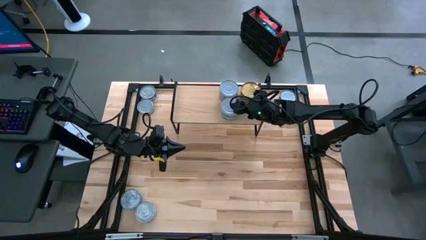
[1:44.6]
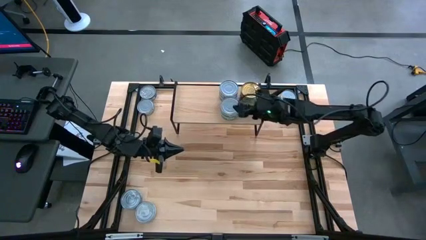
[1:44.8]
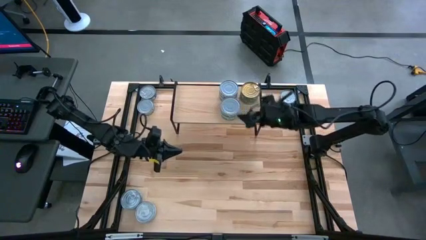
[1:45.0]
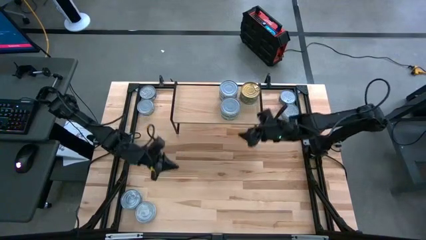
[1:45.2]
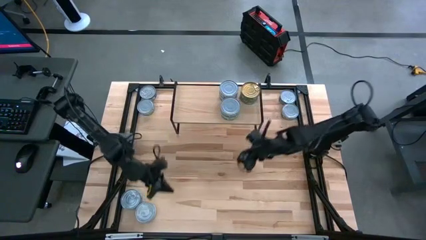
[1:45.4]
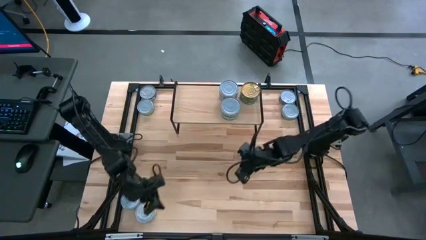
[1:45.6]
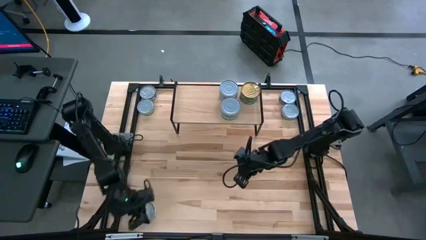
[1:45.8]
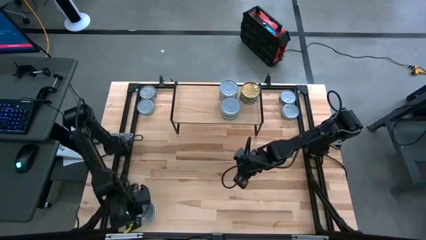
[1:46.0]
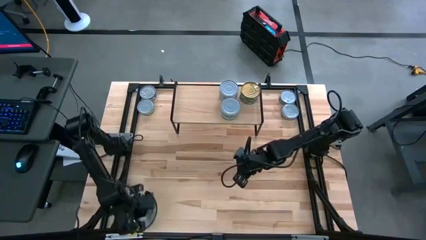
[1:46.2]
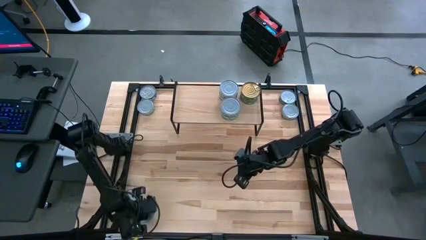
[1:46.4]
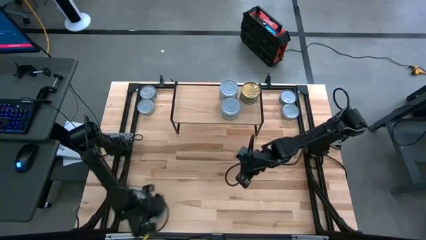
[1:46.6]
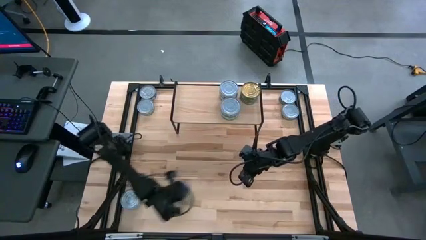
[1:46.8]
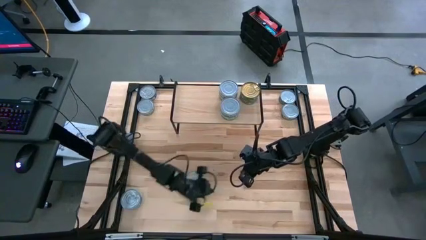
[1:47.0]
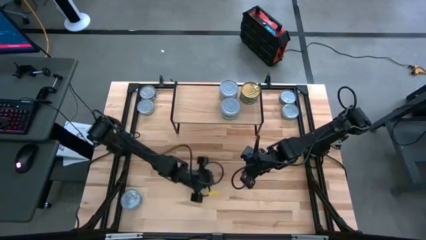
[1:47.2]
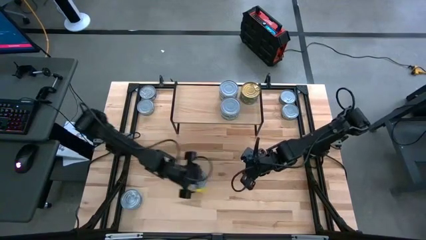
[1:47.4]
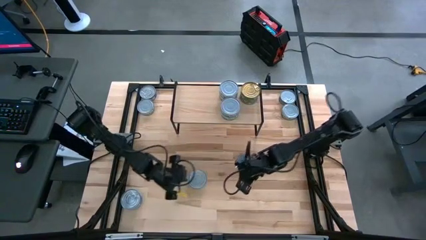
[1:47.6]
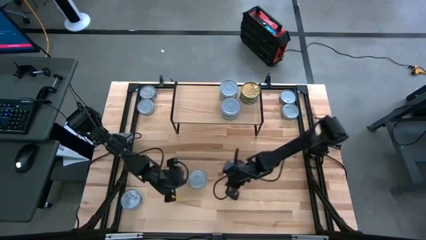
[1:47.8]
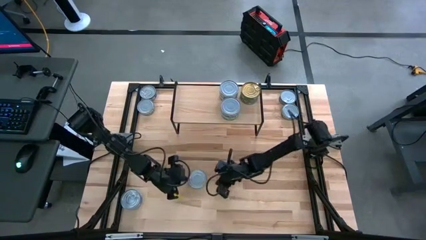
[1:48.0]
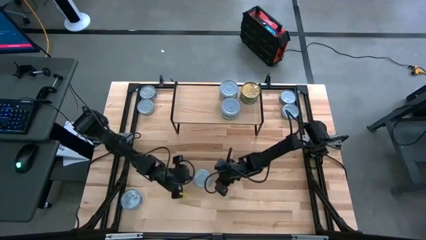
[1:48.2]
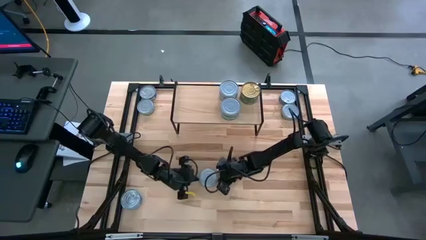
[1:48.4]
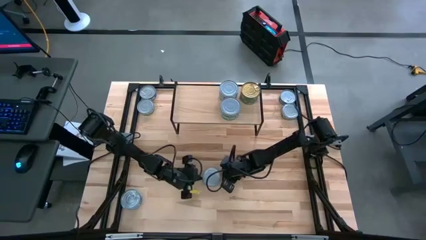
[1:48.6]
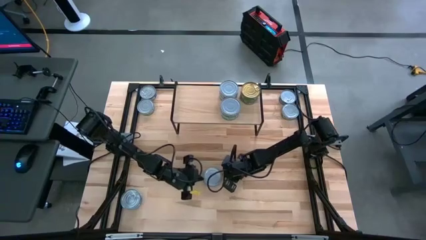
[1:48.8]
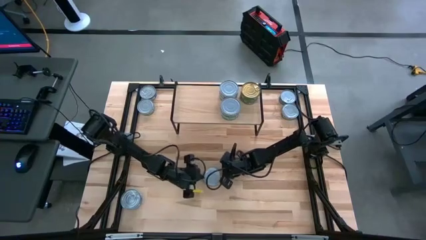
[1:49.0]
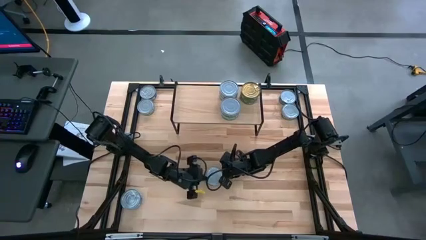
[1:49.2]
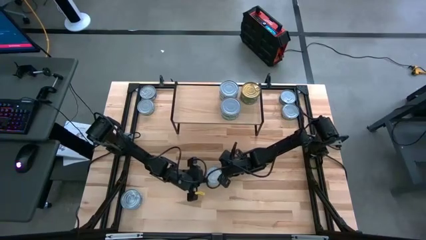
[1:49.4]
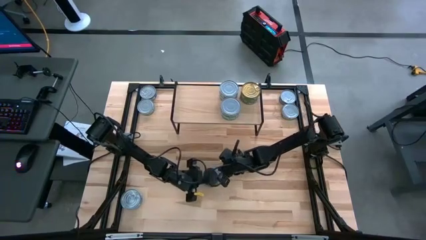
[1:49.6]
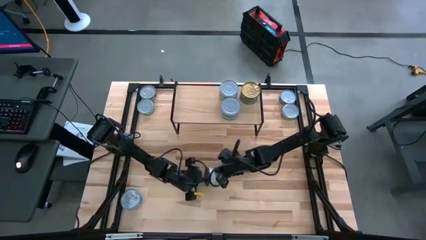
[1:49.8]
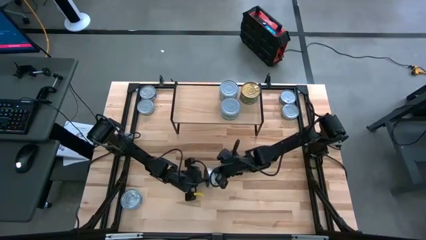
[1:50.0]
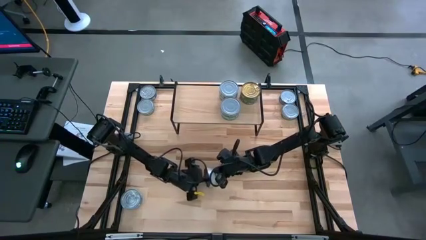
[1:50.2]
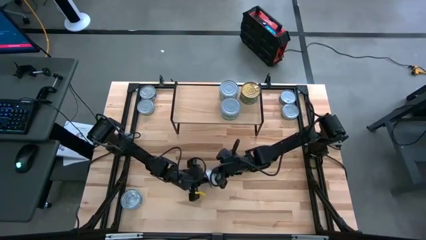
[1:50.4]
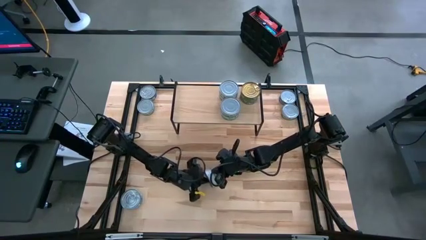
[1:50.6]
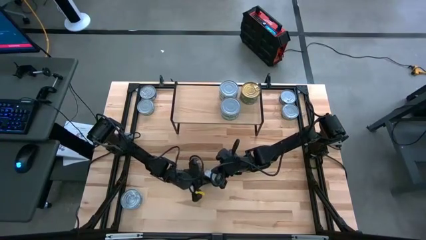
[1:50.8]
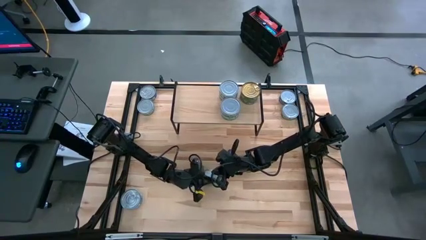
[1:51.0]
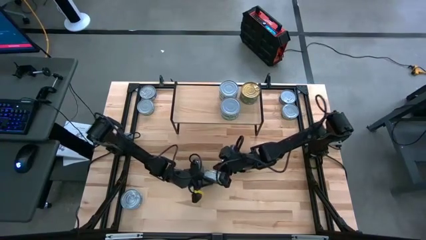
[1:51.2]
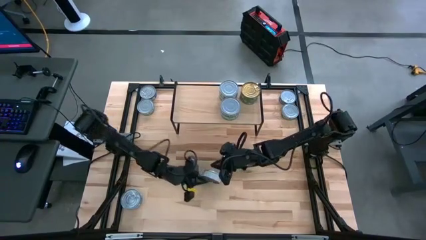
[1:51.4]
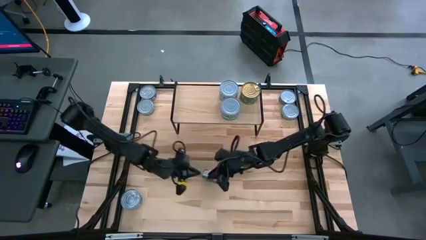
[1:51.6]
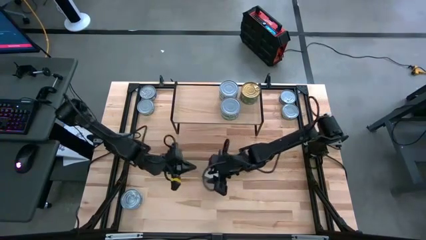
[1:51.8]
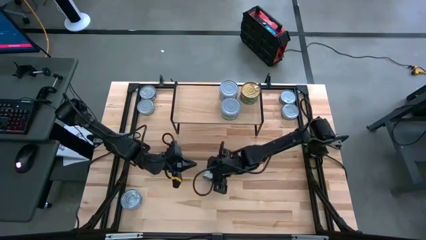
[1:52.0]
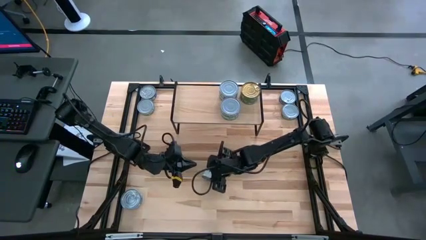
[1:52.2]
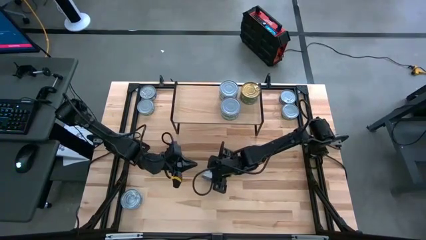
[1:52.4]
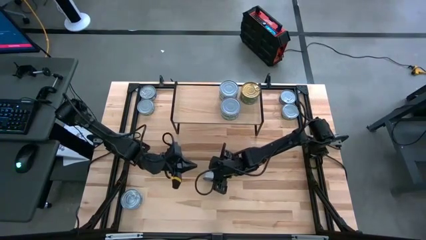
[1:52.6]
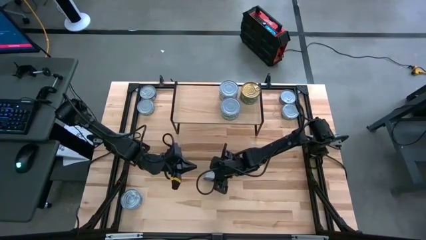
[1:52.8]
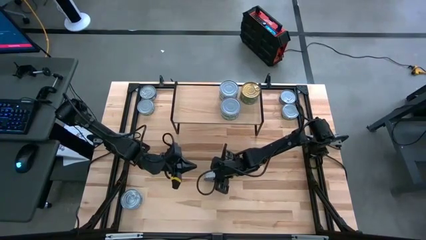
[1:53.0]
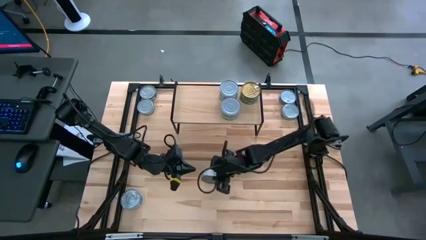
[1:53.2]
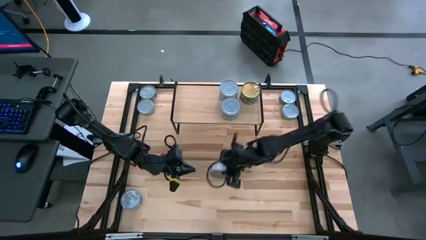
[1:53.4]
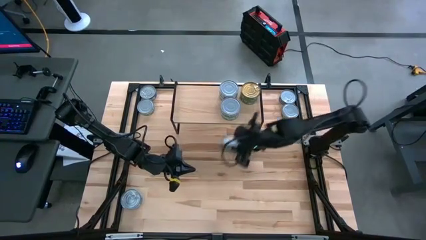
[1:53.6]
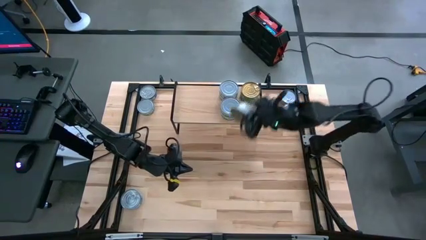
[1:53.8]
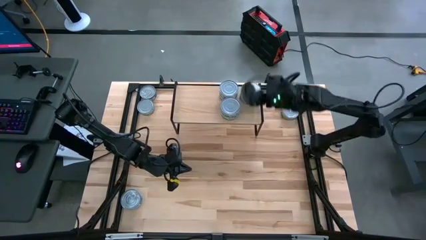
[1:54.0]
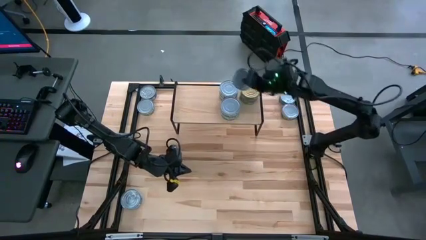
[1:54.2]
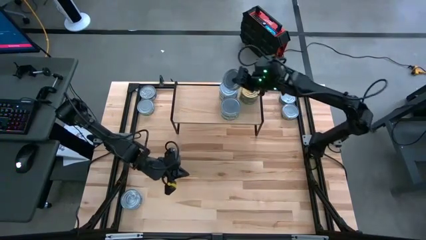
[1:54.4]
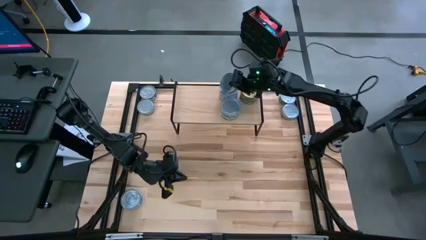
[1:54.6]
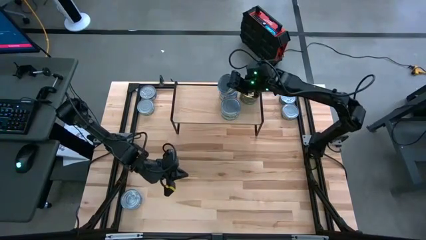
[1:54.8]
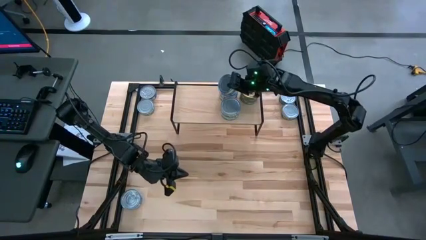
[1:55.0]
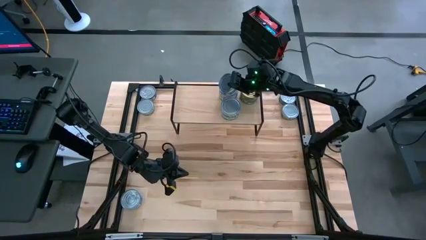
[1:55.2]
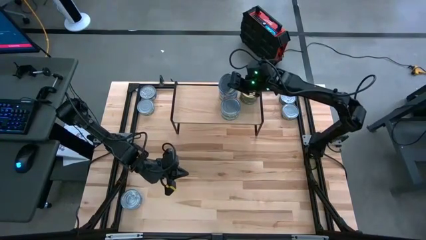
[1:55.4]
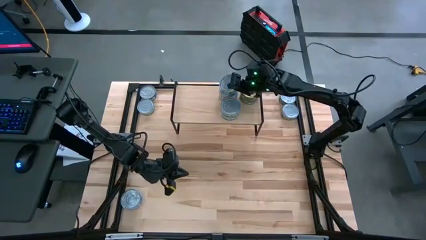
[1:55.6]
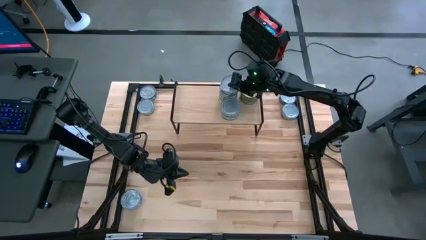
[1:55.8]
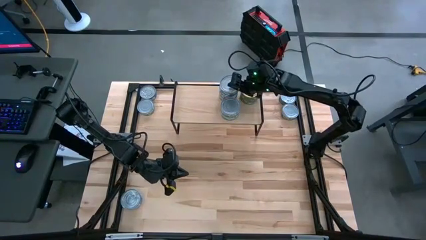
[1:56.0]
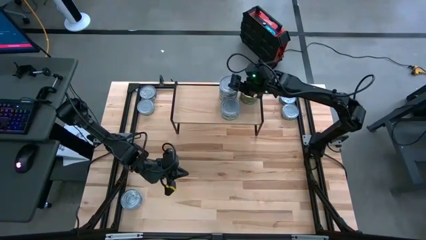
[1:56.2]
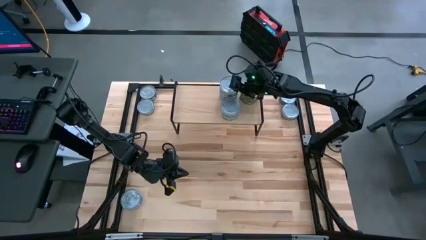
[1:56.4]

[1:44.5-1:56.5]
Task: Stack canned seafood by type on shelf
Stack the light green tuna can on top of the other light green tuna can on the shelf

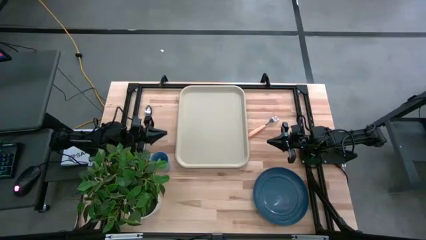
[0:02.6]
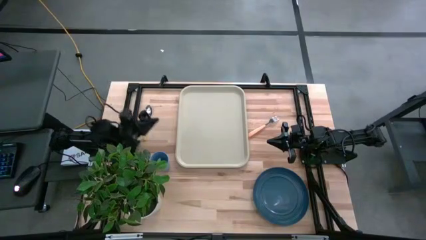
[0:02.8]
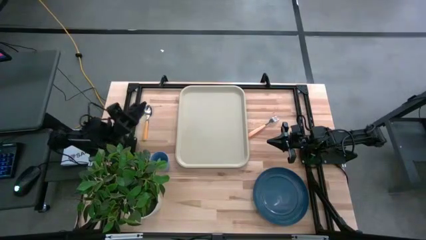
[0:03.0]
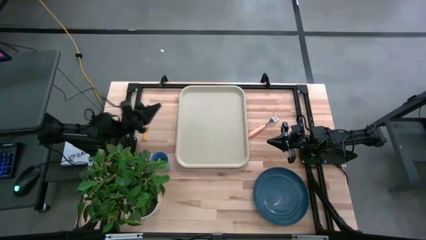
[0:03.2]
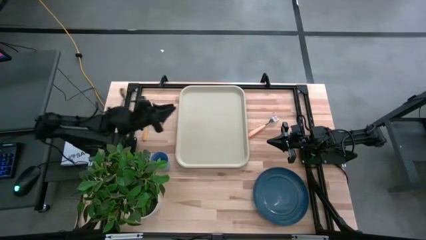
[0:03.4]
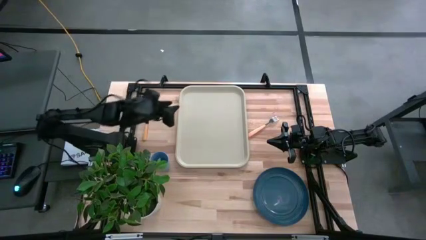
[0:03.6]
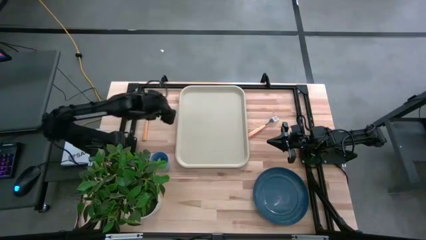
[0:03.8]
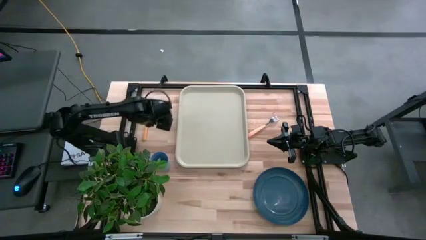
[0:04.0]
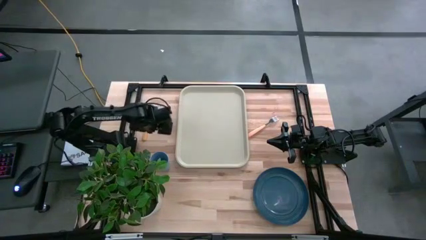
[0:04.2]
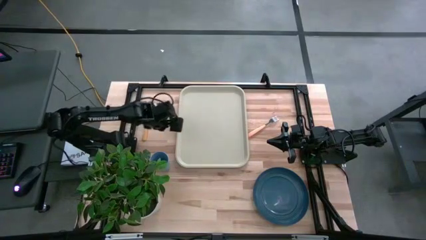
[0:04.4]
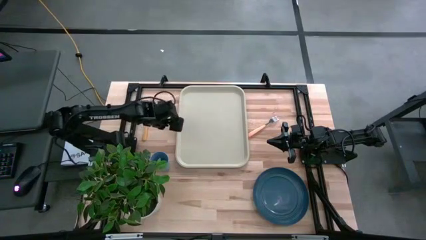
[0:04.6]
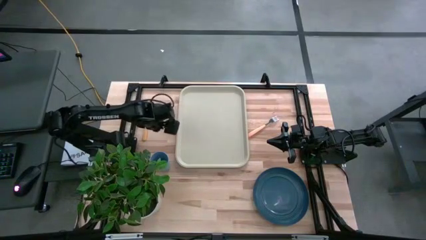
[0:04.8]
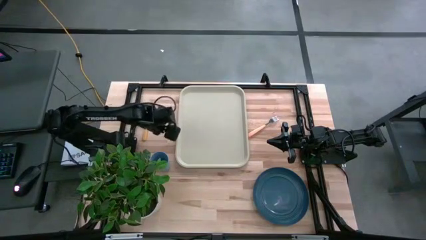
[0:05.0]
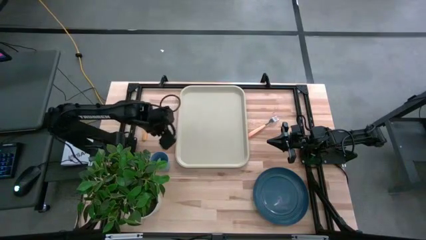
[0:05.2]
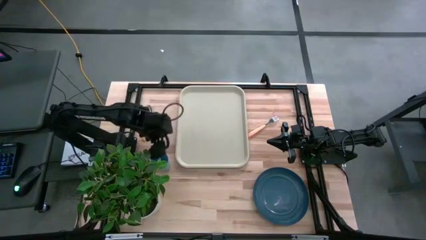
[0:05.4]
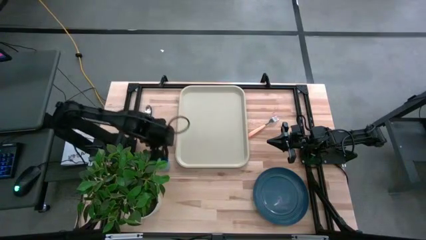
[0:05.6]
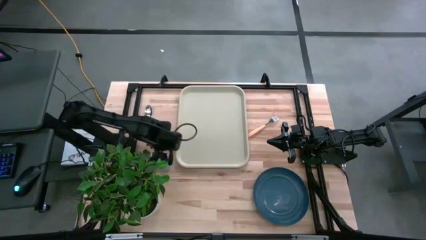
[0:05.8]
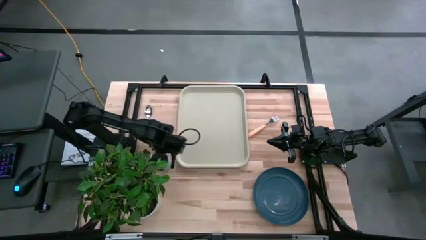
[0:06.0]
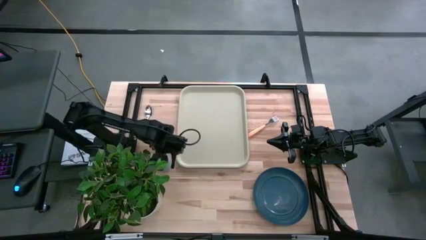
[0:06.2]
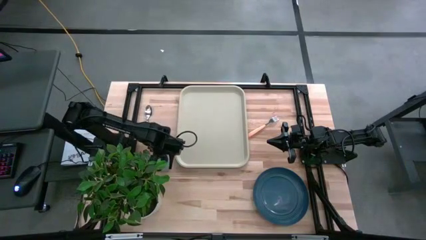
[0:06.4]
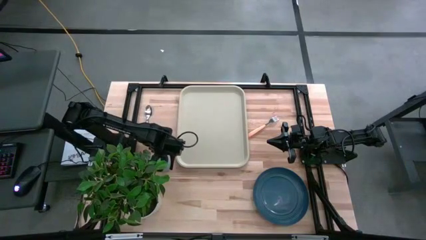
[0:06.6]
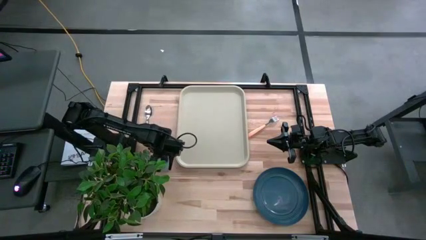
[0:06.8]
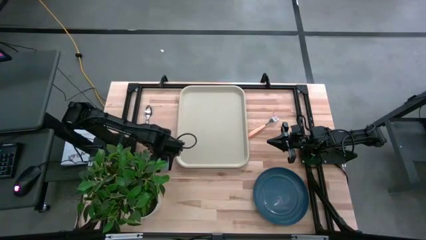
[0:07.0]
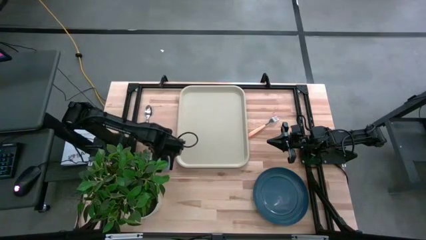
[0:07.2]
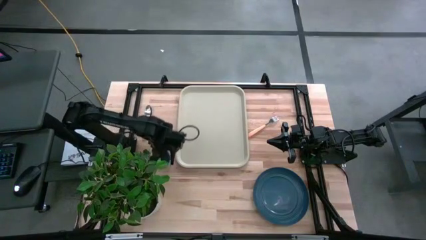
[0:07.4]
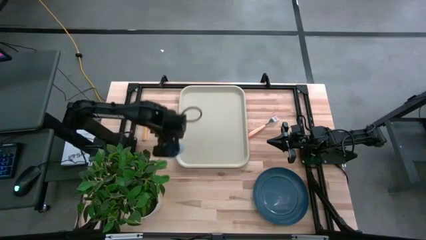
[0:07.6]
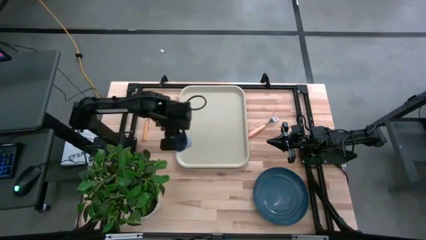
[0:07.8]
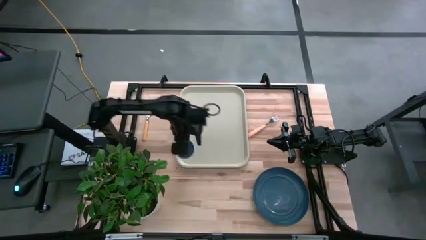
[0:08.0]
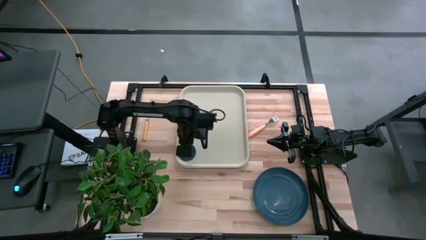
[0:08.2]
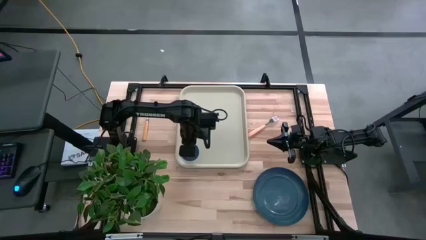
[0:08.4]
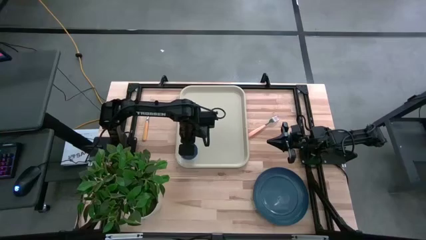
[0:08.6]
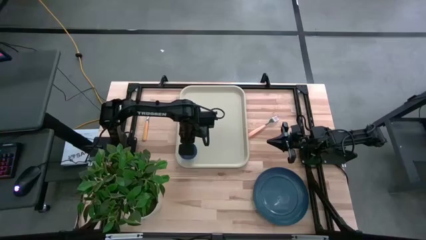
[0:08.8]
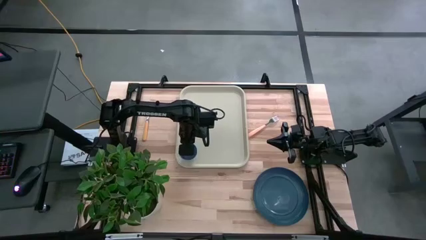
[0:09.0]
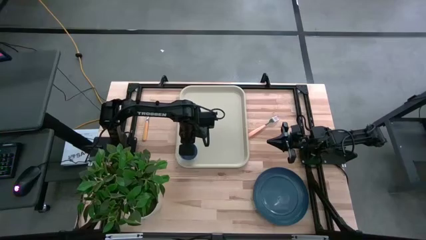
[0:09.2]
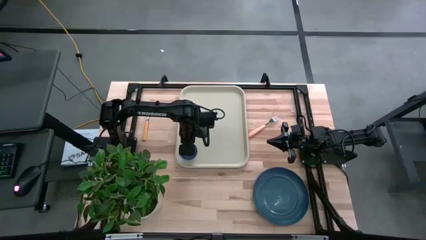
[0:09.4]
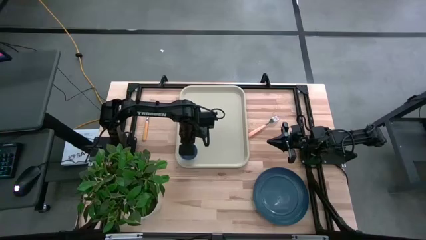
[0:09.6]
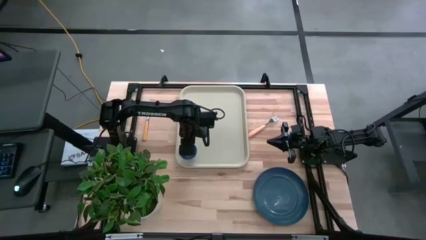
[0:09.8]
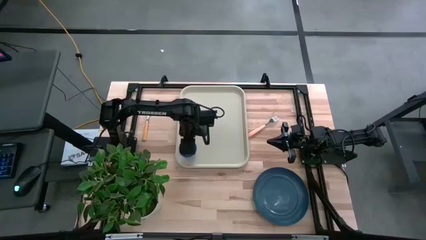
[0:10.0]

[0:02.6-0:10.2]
Task: Pick and place plate/cup/fork/spoon on tray
Put the blue cup on the white tray
